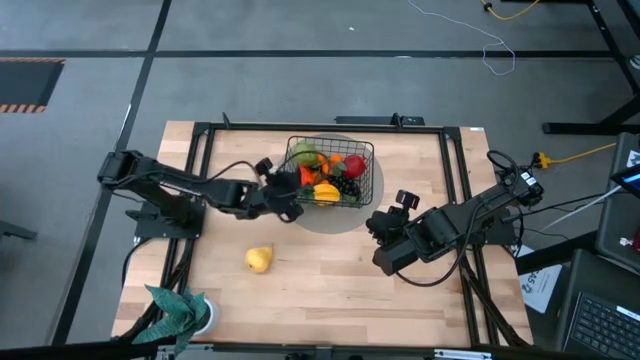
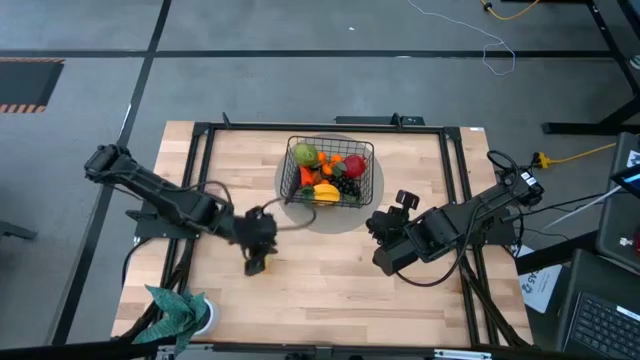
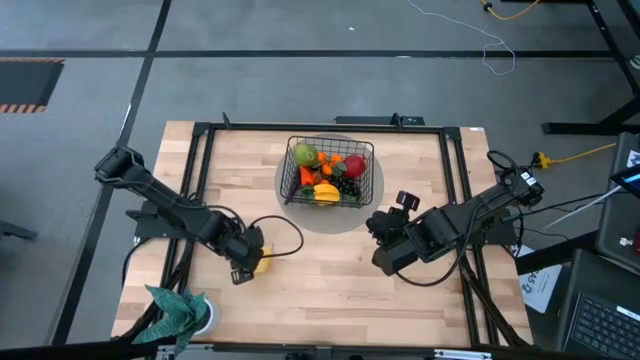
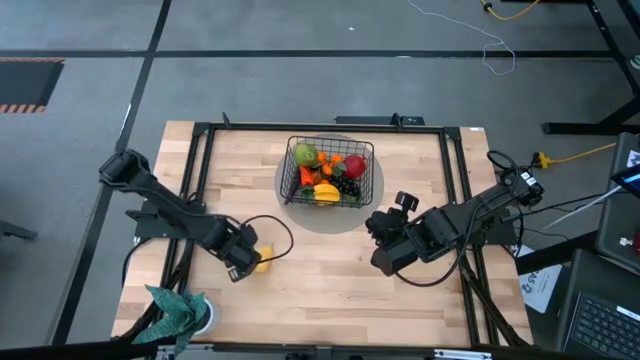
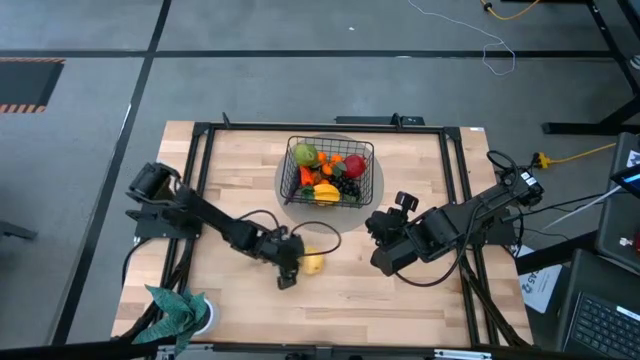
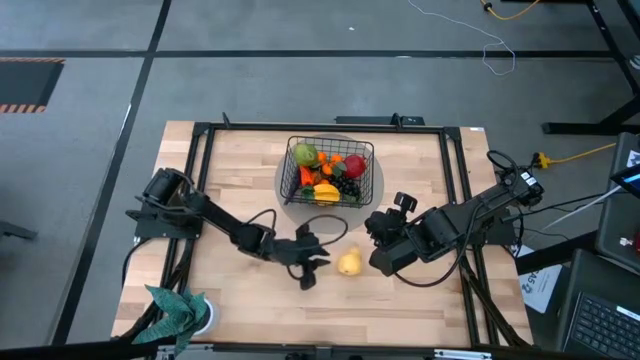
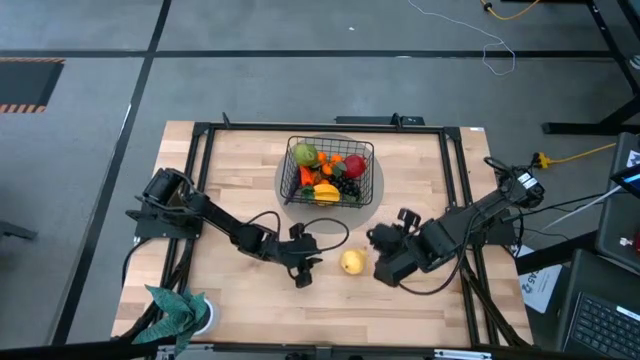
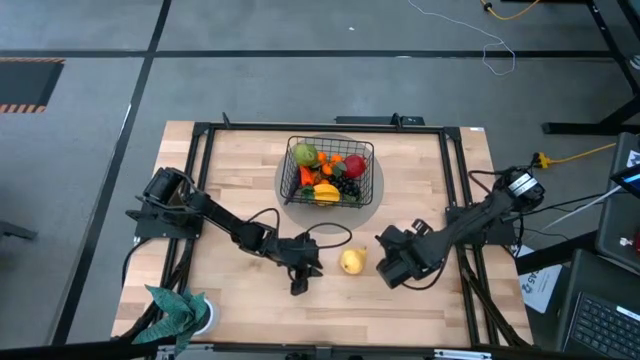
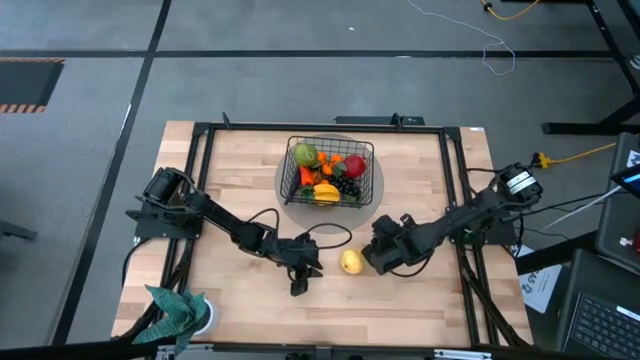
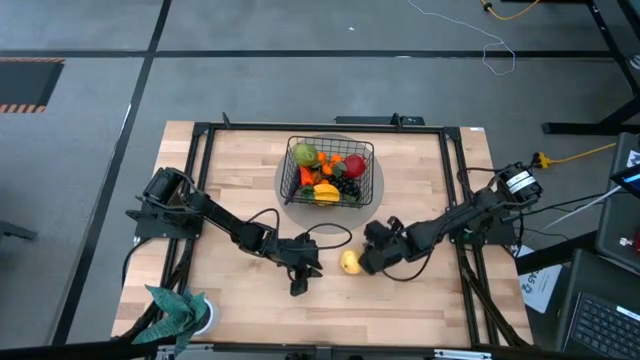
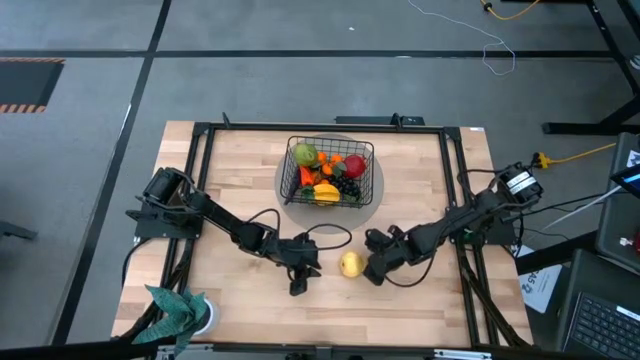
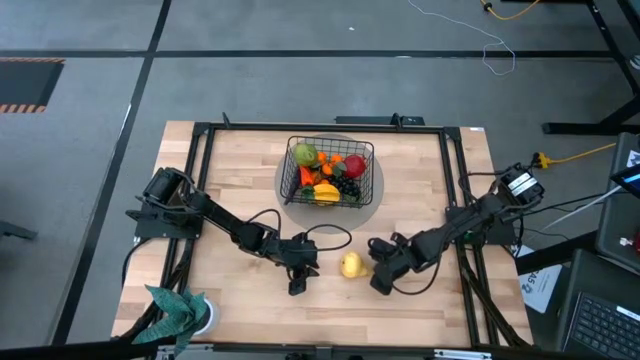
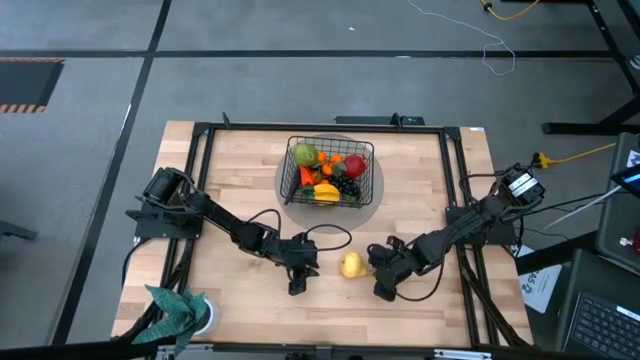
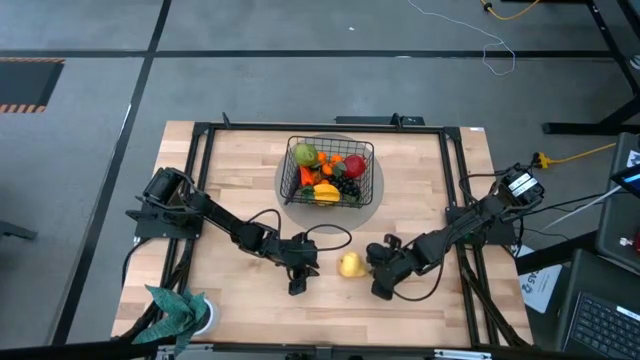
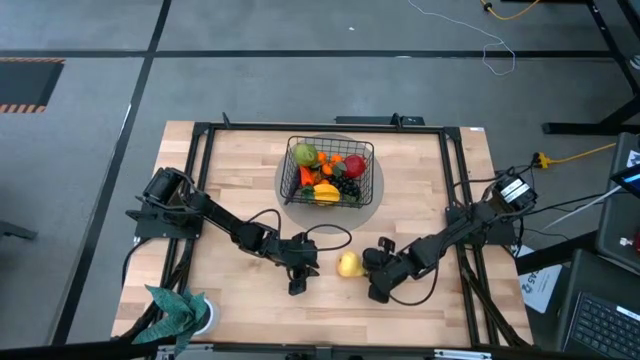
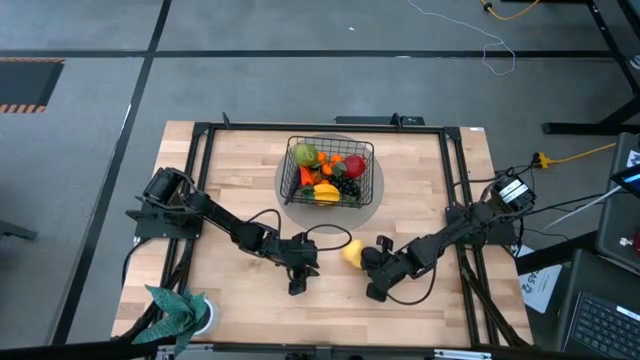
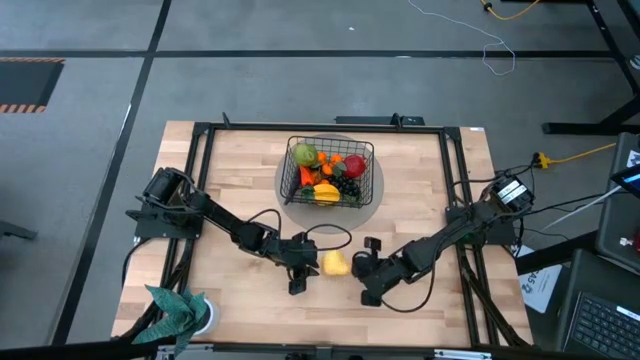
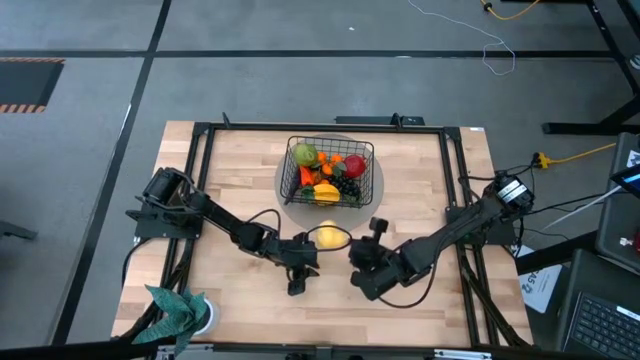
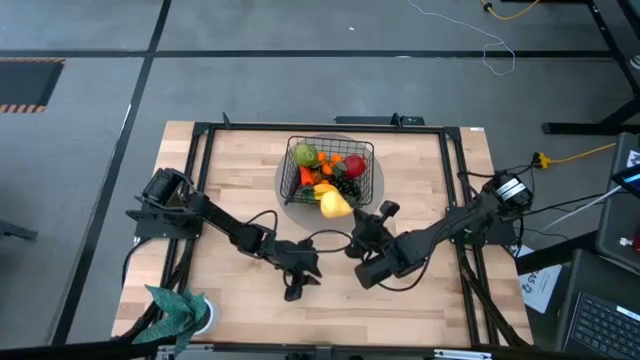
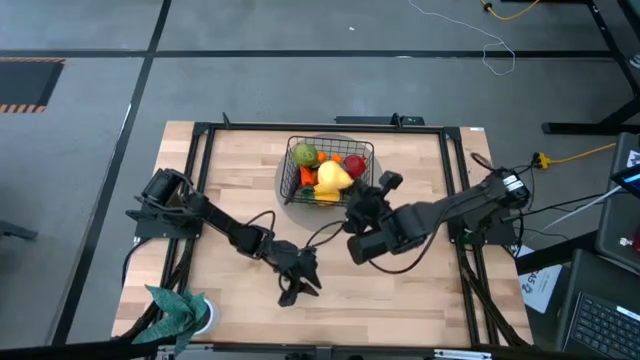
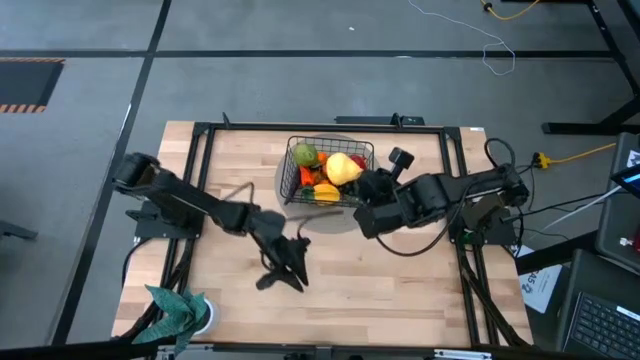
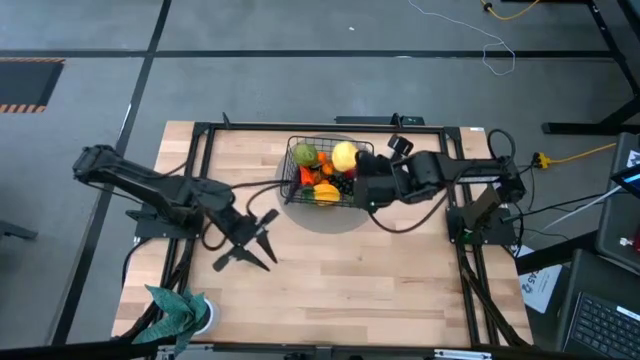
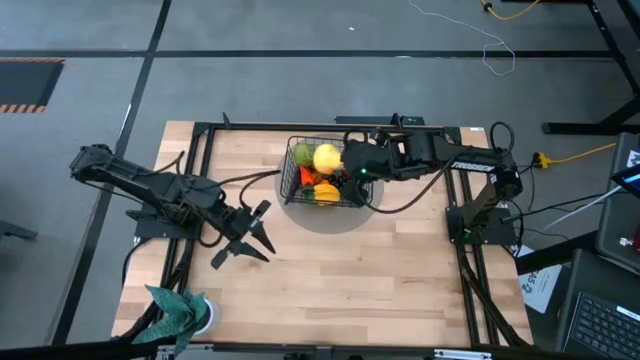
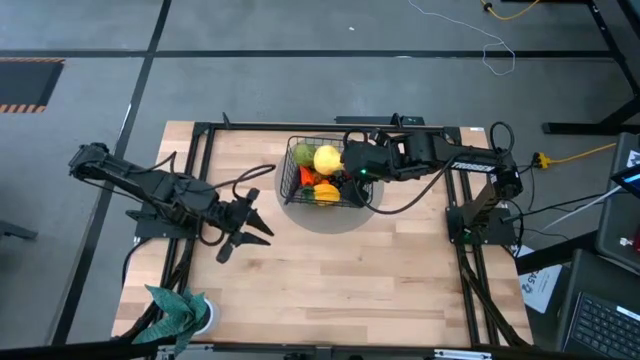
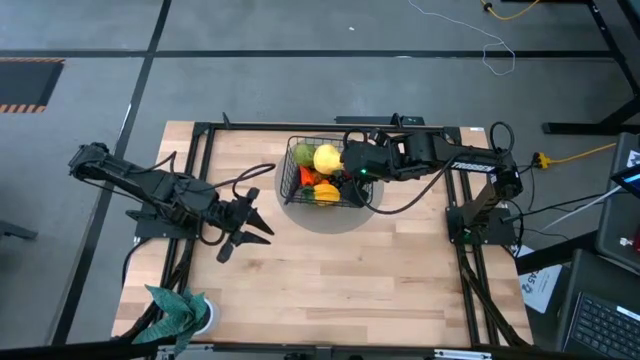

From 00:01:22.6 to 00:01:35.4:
Task: Build produce basket
Put the yellow pear into the black wire basket
